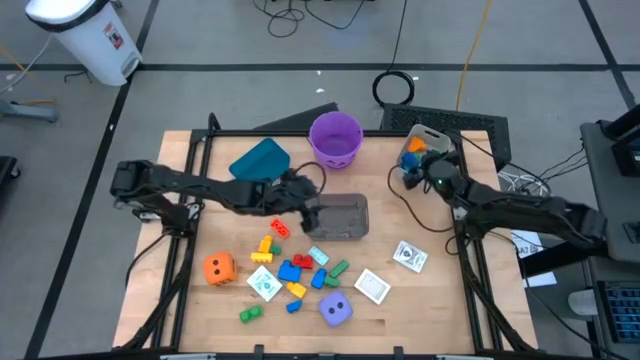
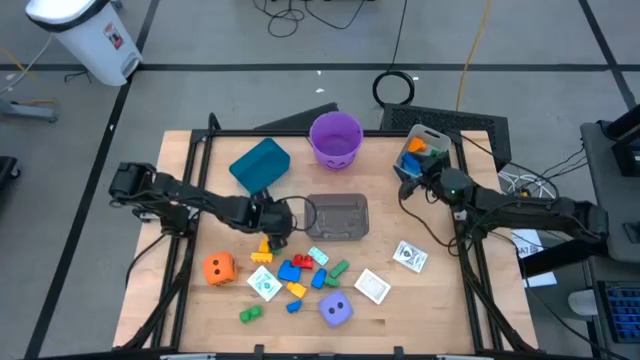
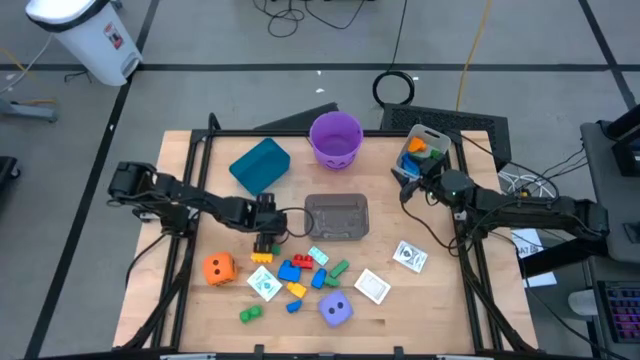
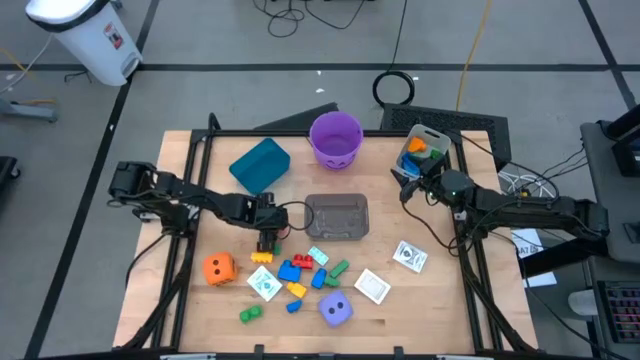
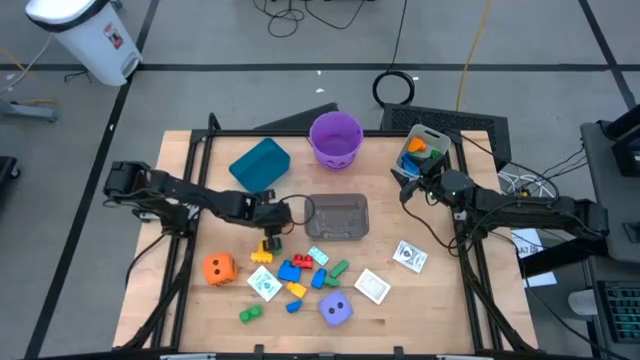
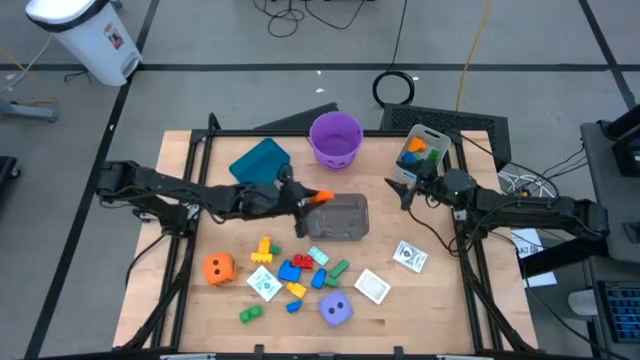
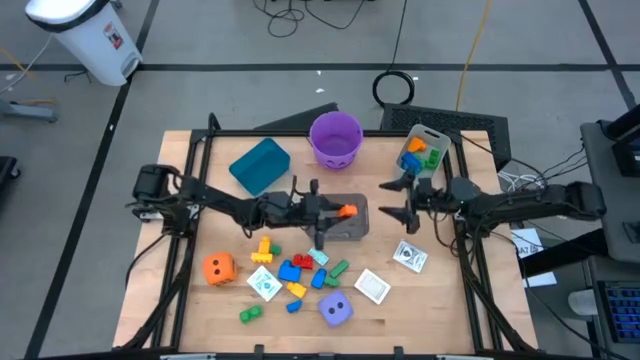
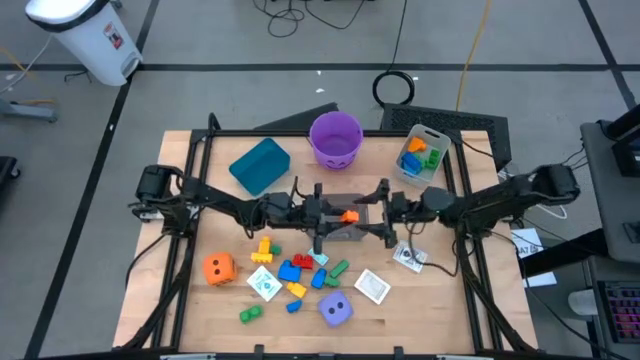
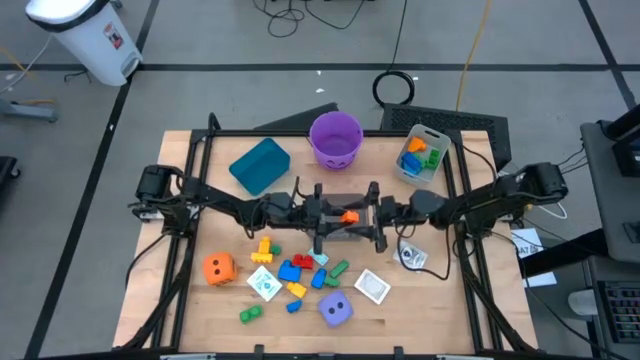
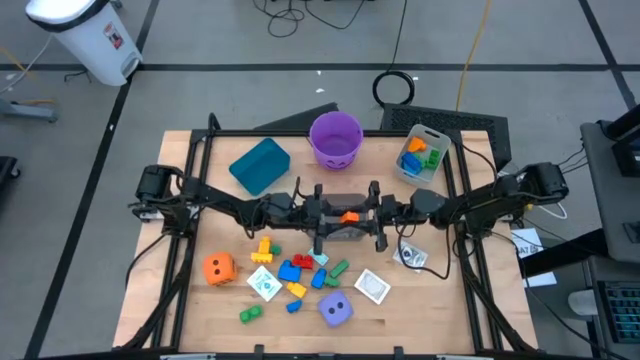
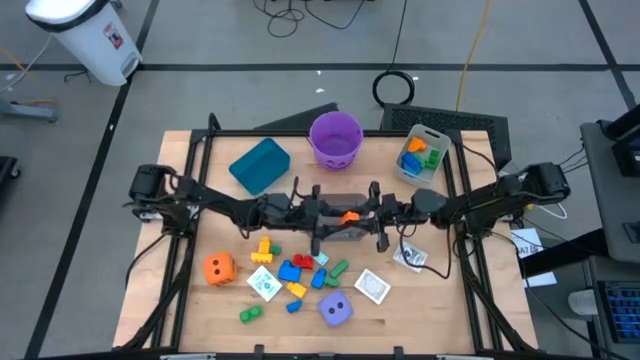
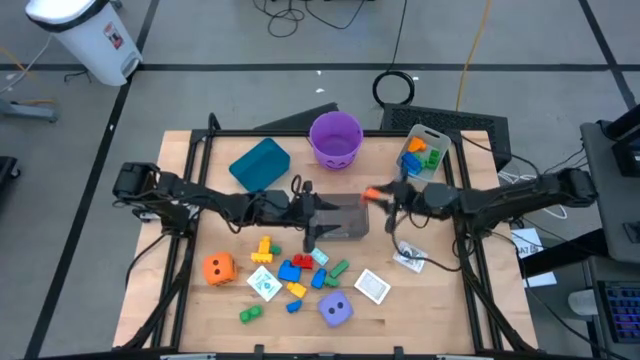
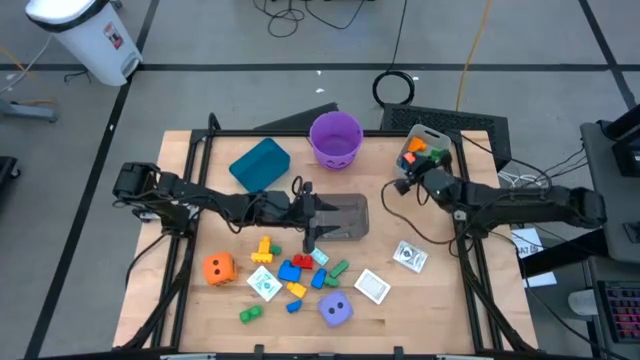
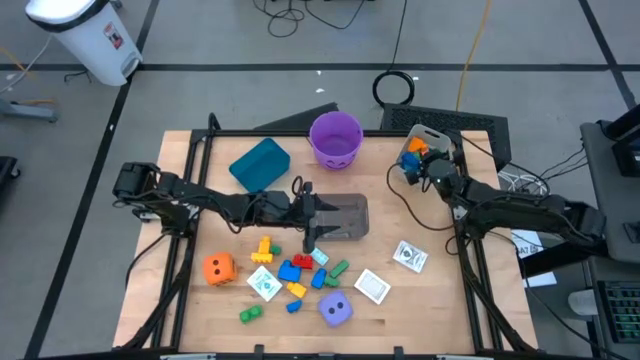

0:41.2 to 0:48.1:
Task: Pick & Place Toys
Put the orange game piece into the white bin

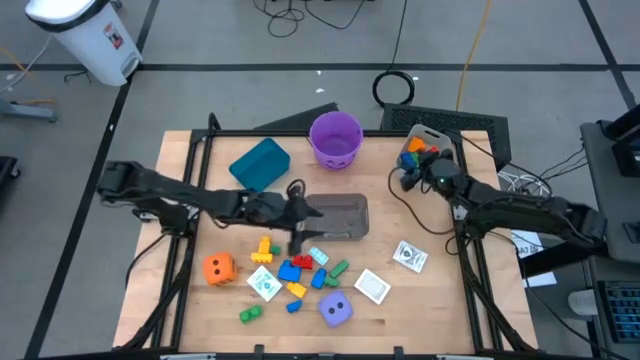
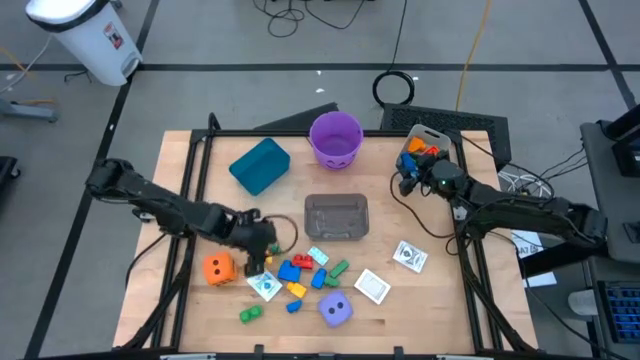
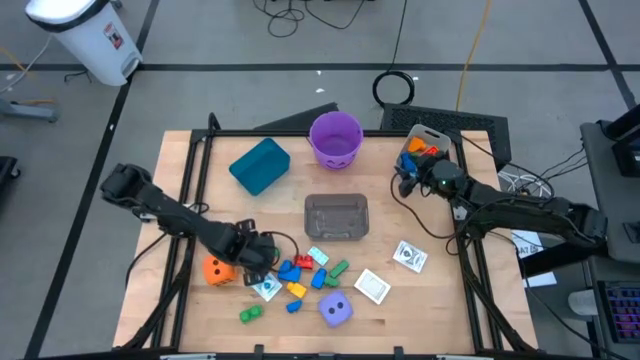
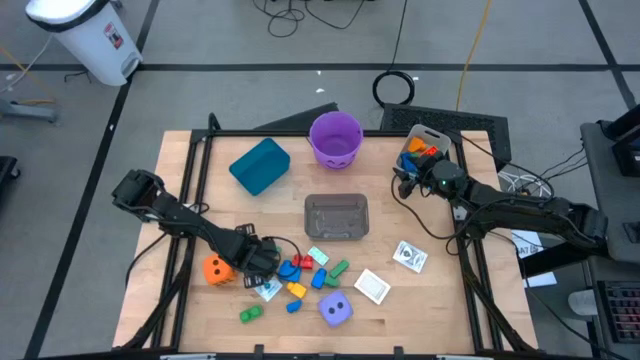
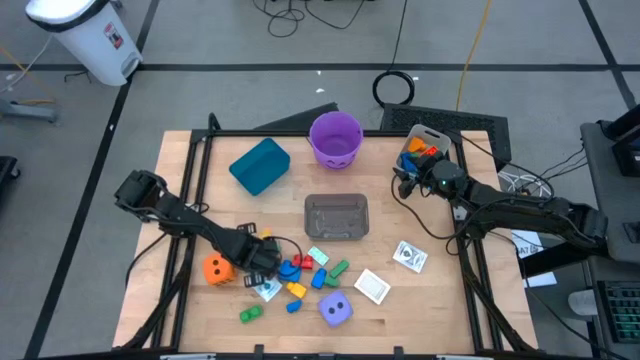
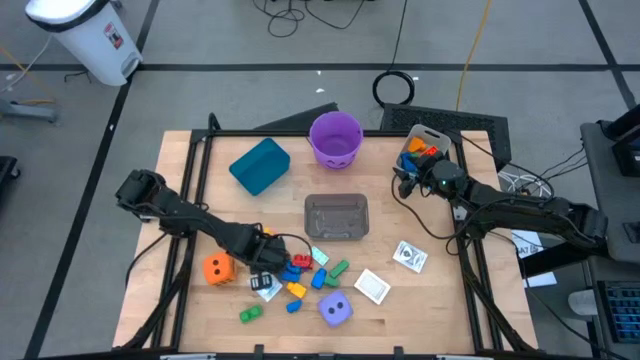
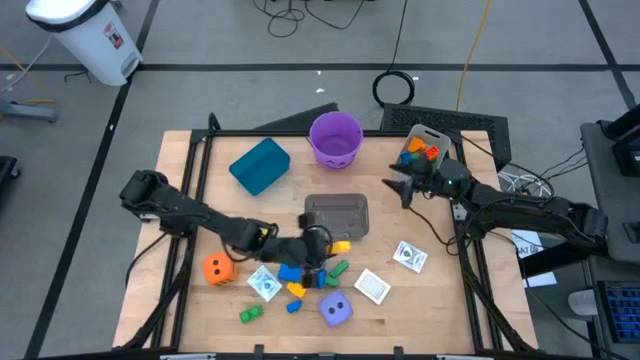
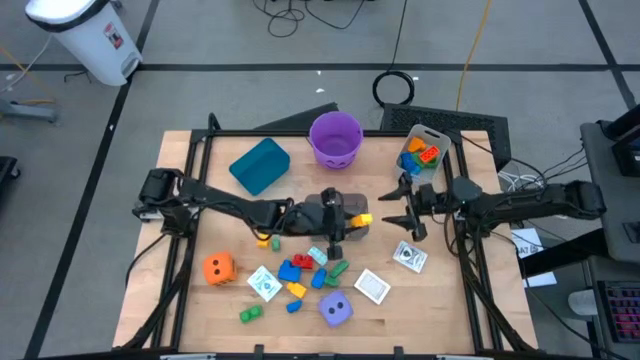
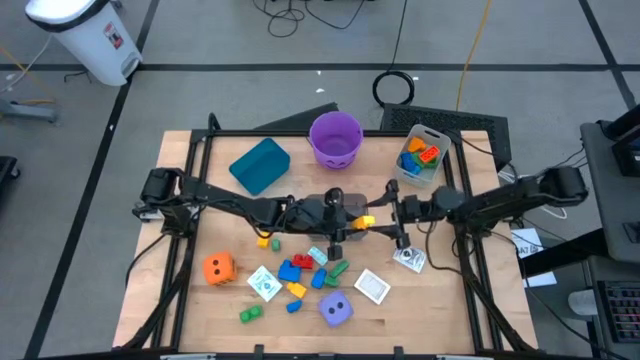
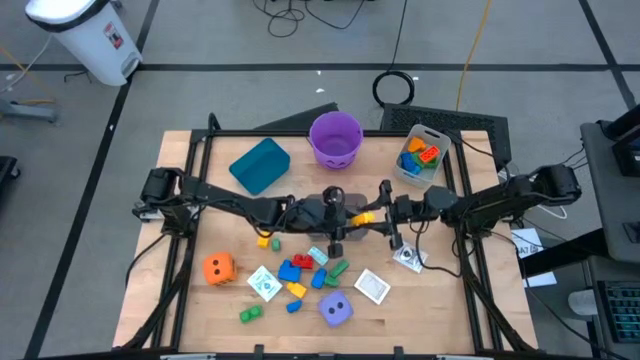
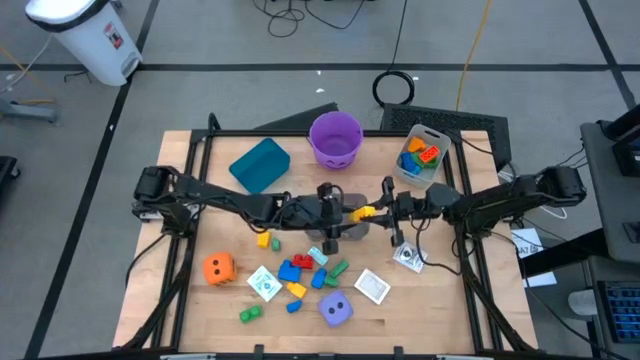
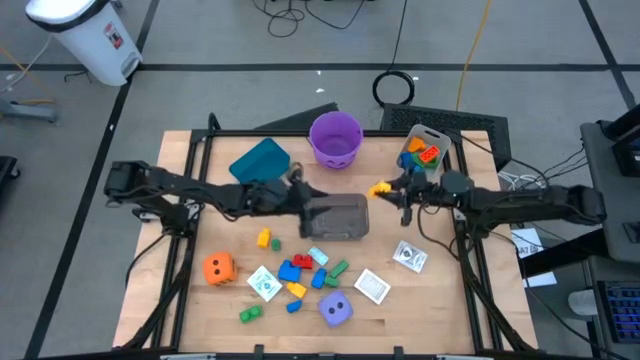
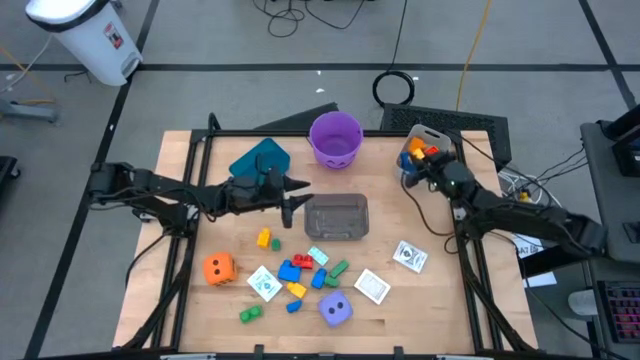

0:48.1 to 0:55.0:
Put the yellow game piece into the white bin

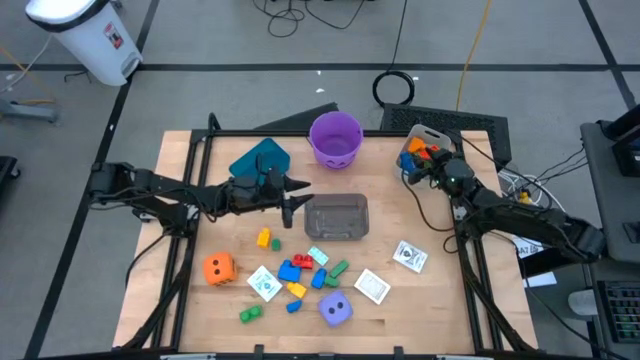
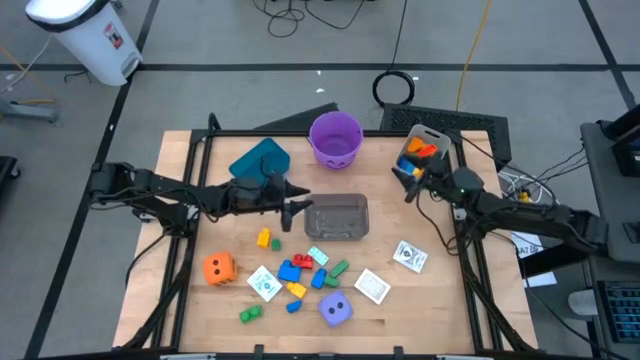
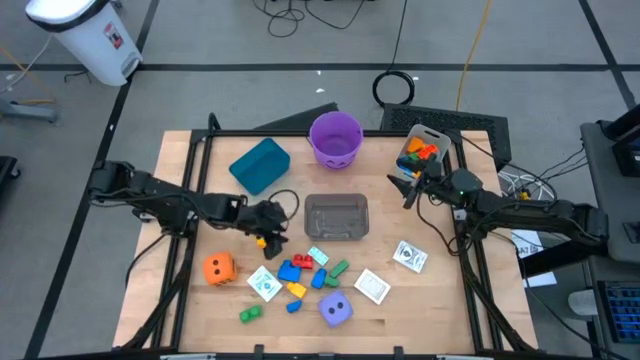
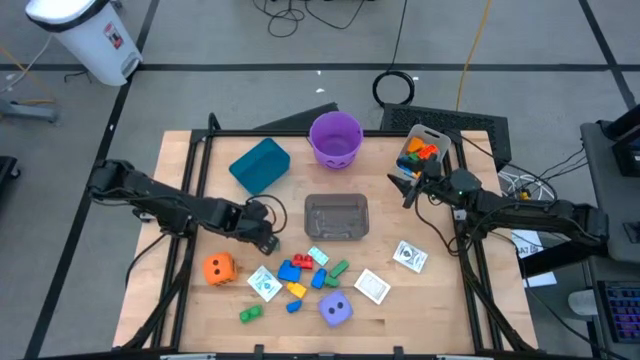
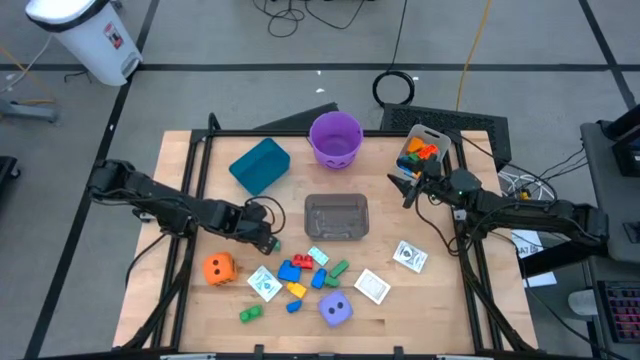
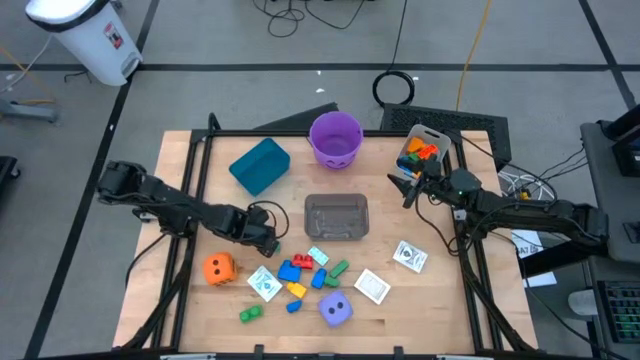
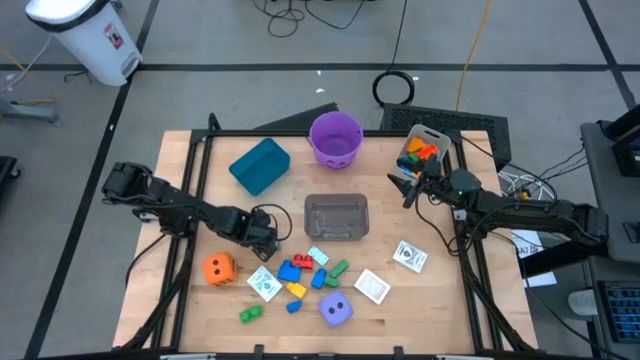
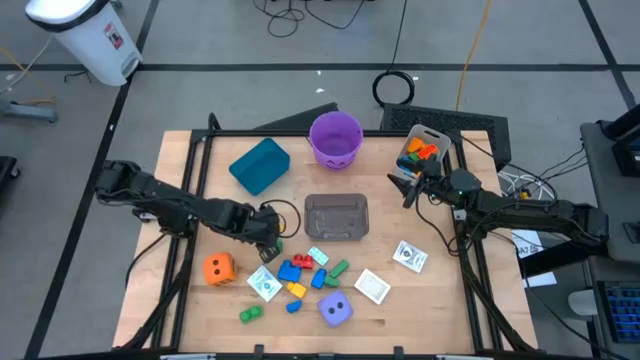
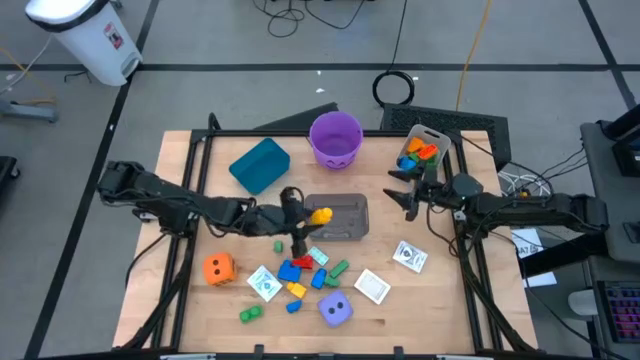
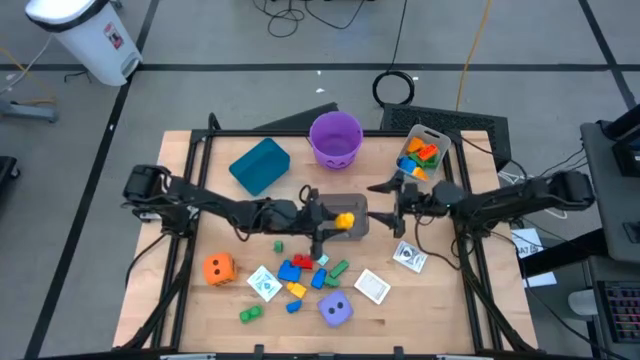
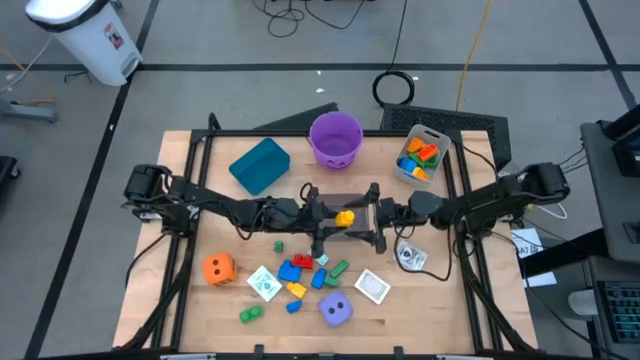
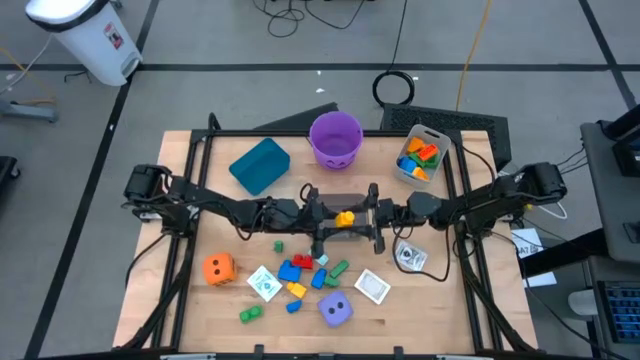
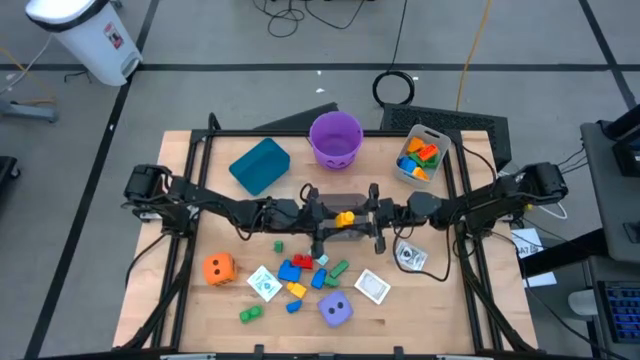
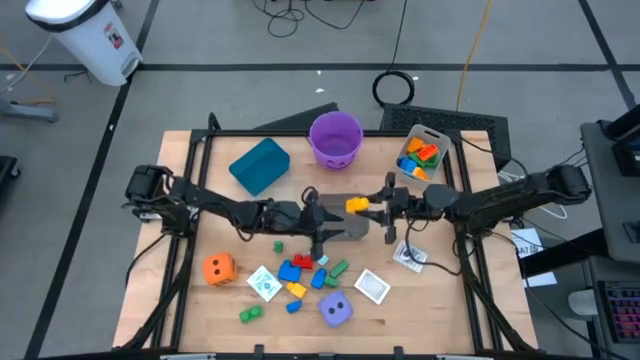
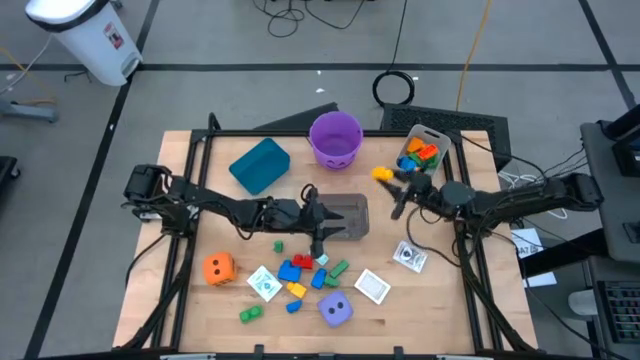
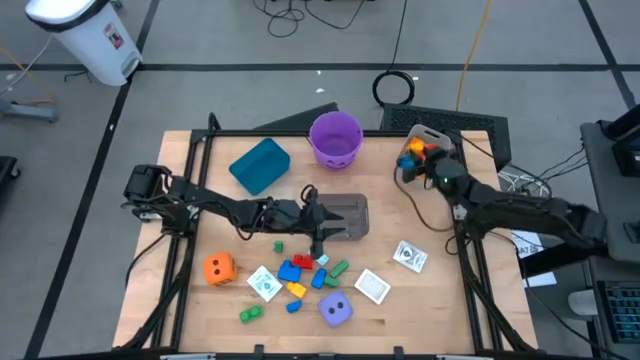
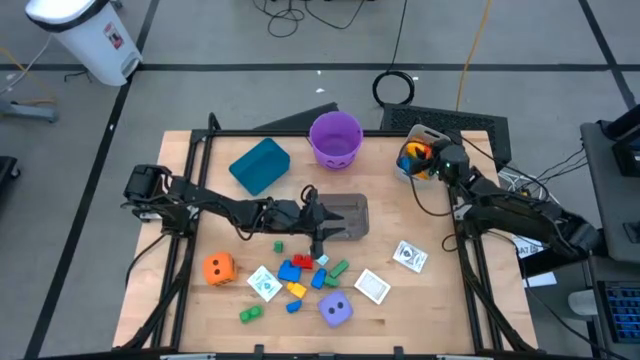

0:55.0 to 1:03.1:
Put the left yellow game piece into the white bin
